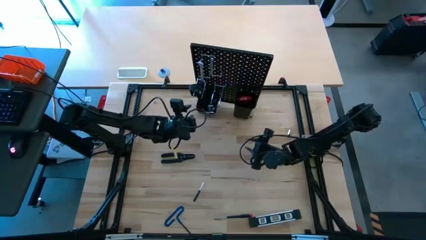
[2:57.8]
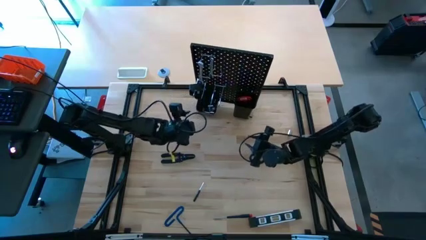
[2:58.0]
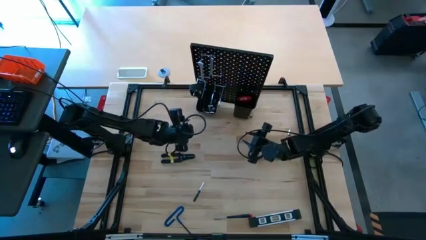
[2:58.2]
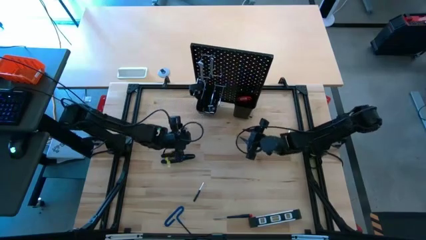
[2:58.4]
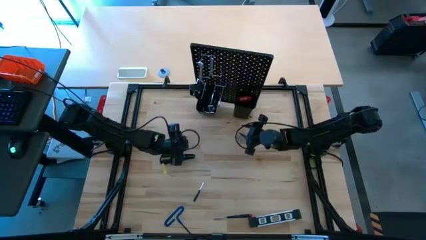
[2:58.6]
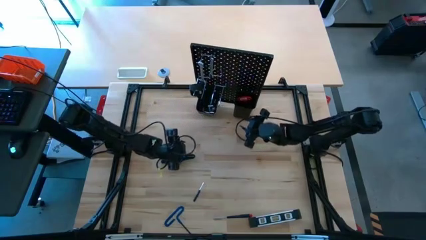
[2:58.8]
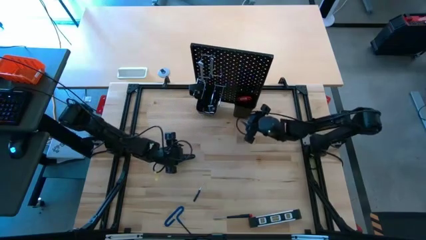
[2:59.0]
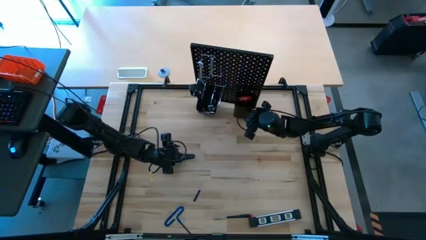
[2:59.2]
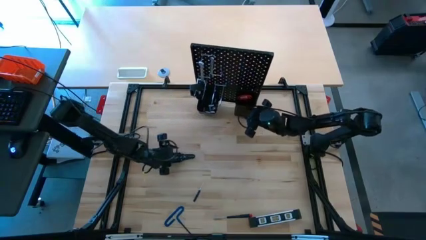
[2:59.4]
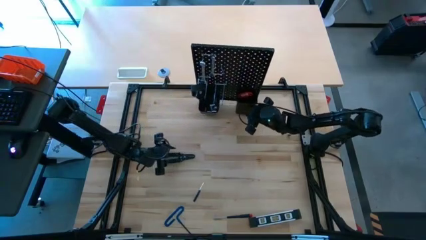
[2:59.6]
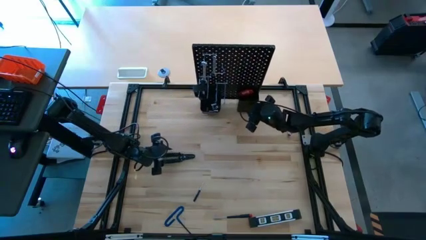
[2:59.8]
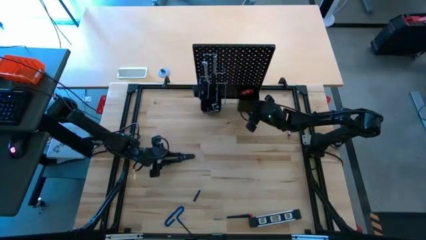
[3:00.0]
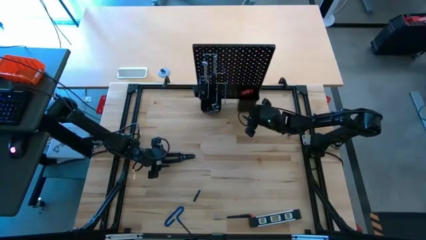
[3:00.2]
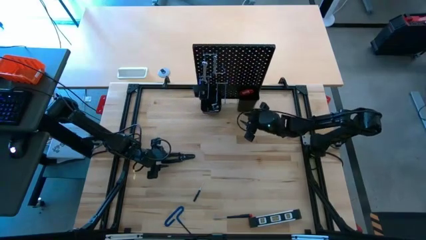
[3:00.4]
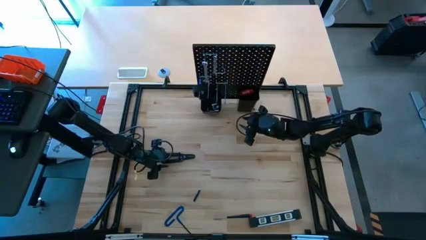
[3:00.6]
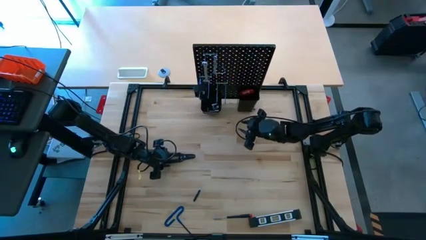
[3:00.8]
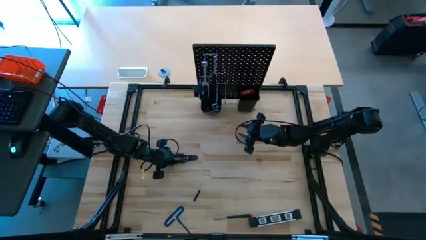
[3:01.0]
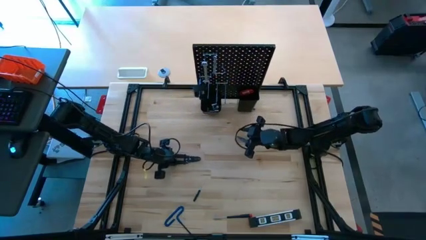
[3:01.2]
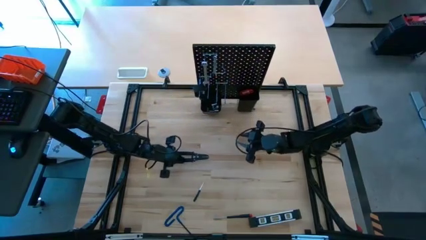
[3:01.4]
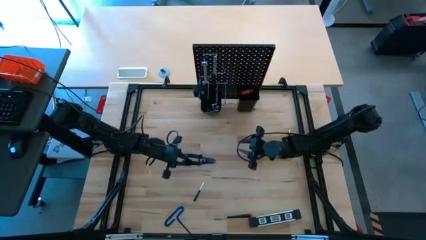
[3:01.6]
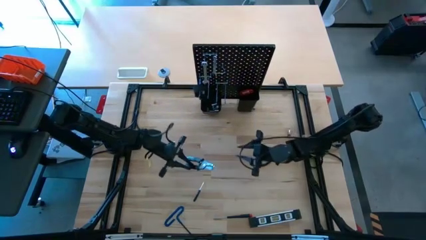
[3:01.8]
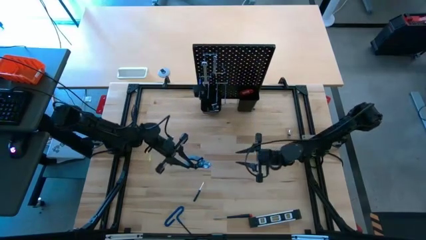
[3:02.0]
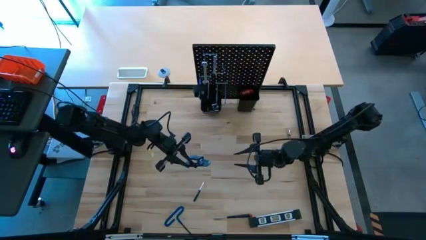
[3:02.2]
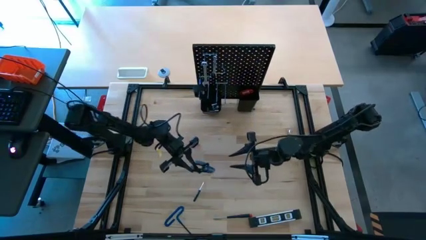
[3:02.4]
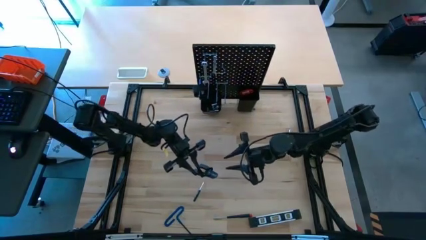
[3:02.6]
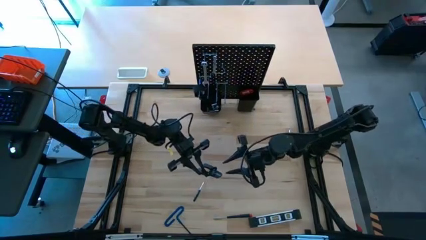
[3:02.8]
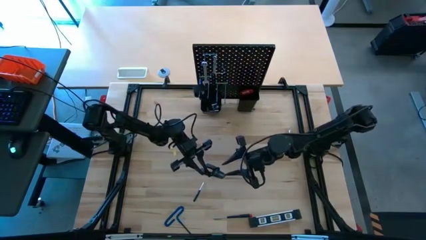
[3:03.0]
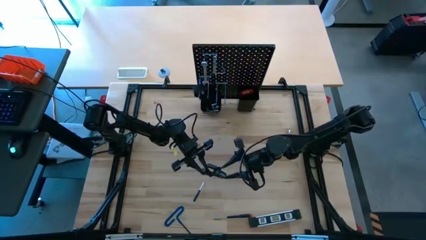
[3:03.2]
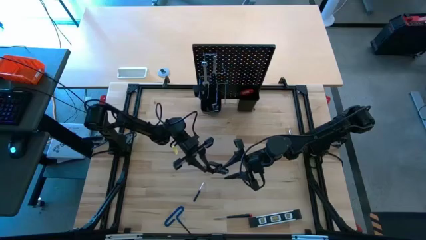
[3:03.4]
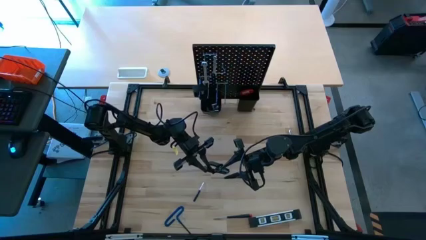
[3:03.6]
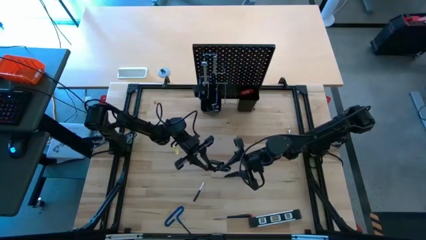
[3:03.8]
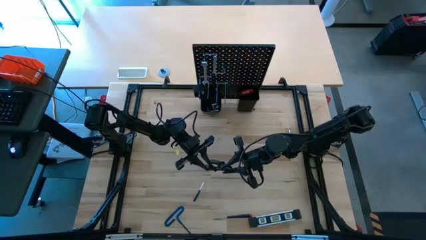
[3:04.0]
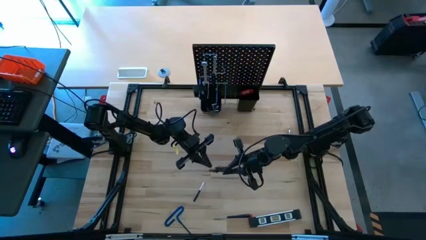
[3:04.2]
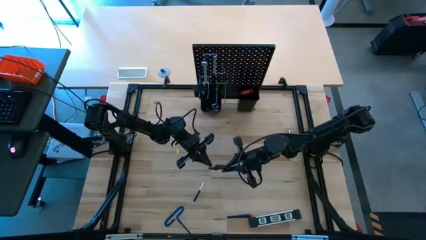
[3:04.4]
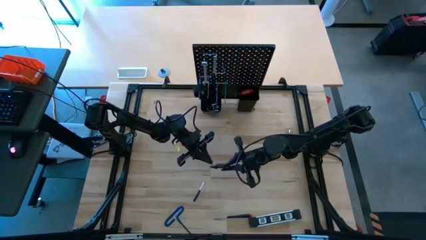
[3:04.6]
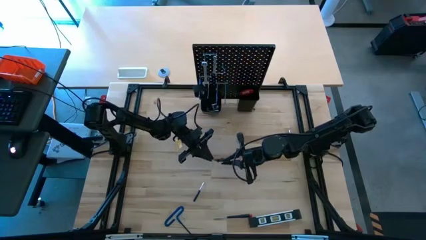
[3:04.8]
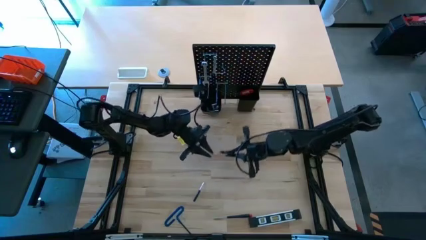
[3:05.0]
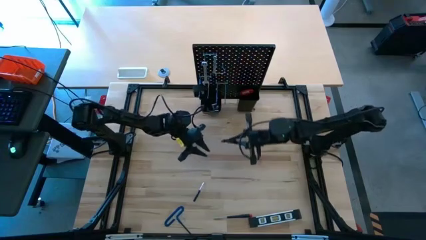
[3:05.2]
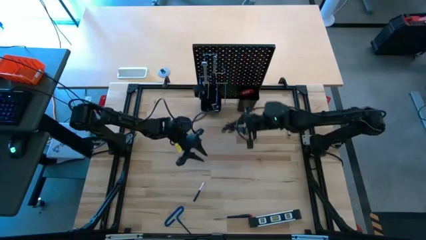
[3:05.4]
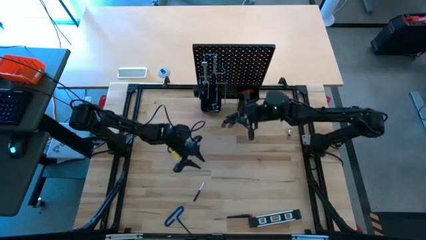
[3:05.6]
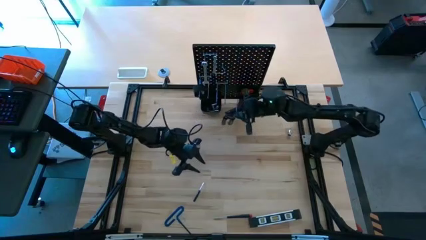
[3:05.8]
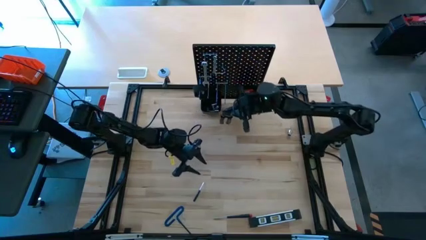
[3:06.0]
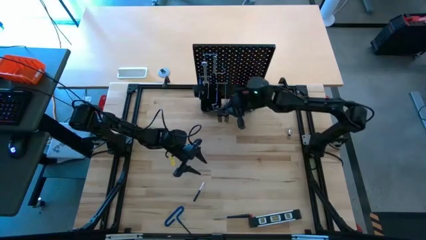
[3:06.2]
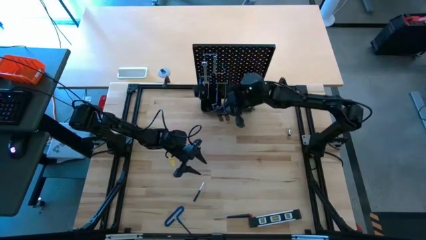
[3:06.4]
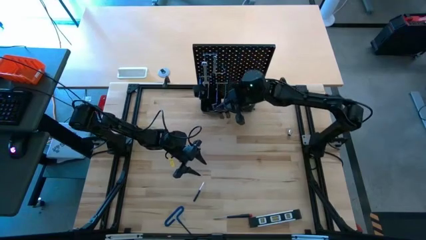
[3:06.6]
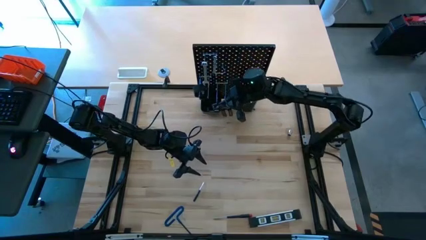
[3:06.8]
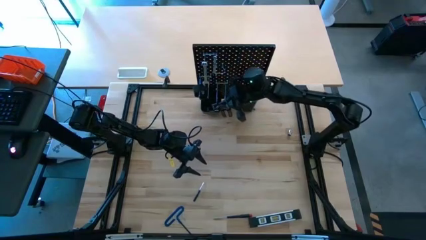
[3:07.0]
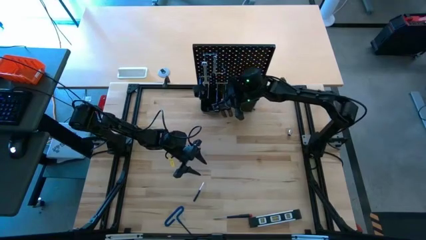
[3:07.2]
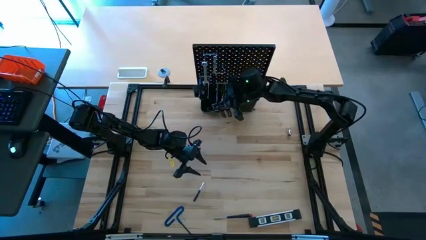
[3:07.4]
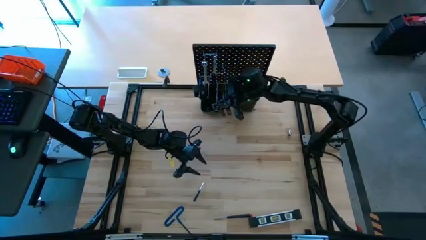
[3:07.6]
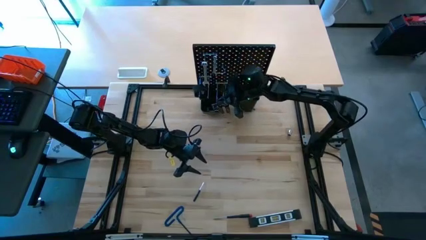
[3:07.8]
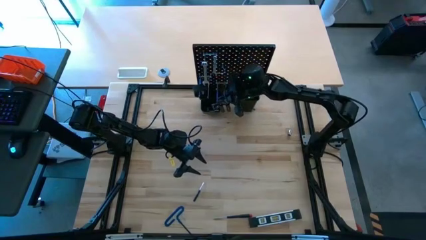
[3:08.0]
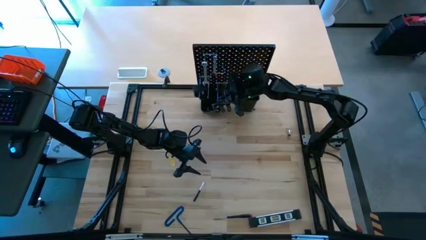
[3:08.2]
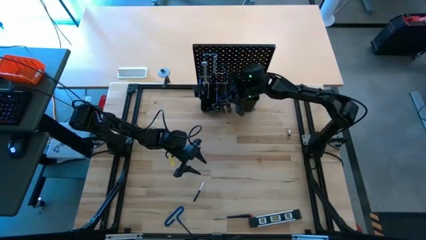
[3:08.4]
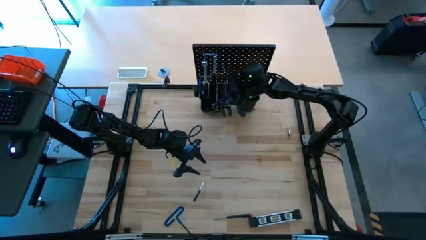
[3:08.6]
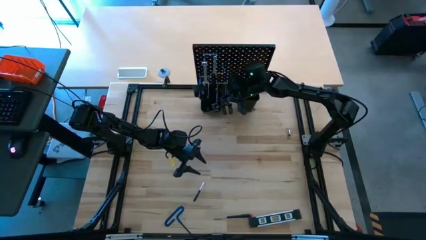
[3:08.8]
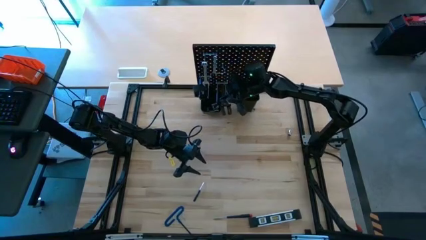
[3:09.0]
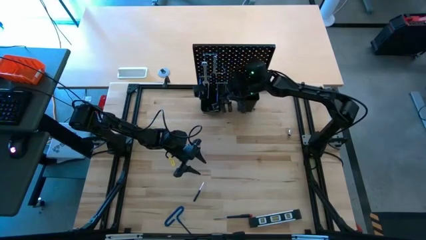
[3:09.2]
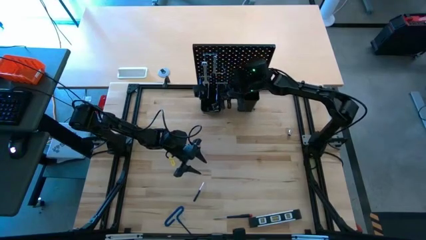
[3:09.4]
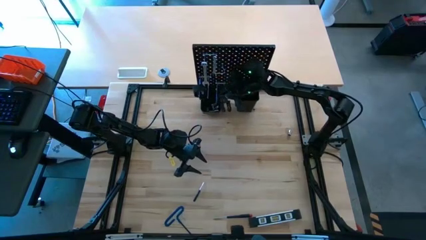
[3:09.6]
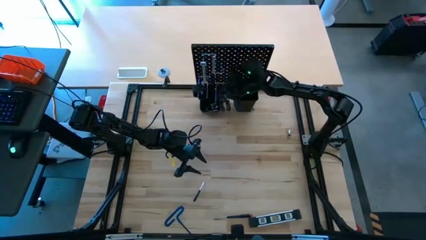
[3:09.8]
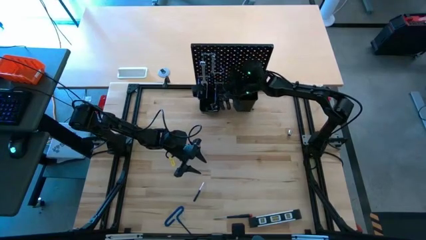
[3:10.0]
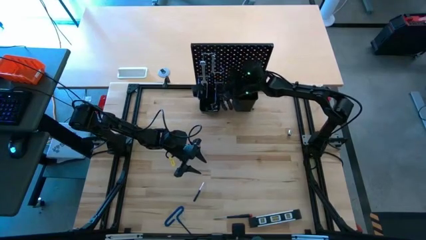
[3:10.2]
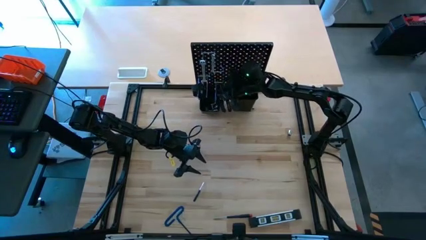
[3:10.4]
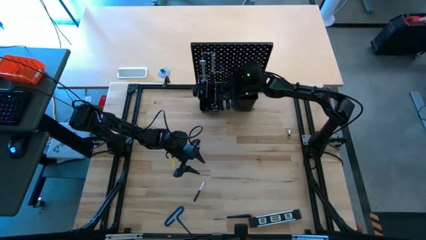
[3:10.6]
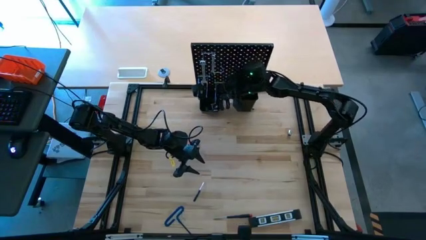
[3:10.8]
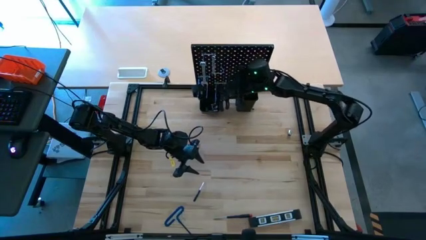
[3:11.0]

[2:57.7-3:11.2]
Task: Hang tools onto peg board
Hang the wire stripper on the pegboard

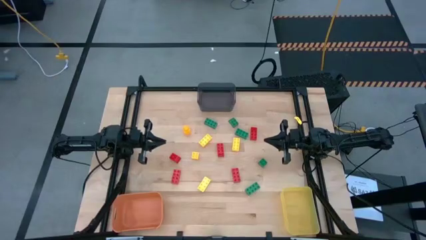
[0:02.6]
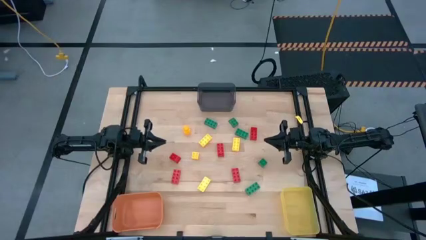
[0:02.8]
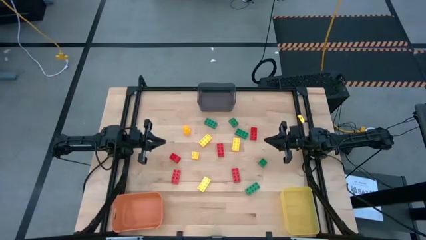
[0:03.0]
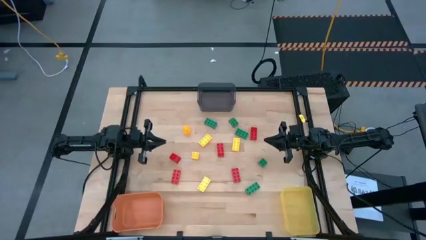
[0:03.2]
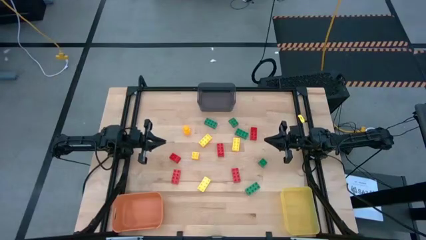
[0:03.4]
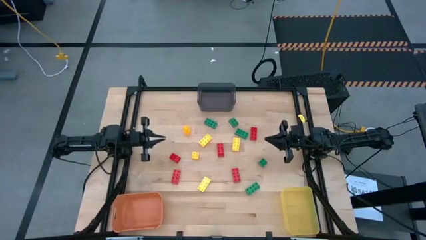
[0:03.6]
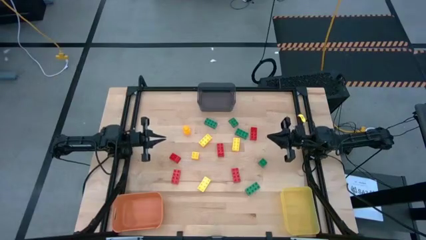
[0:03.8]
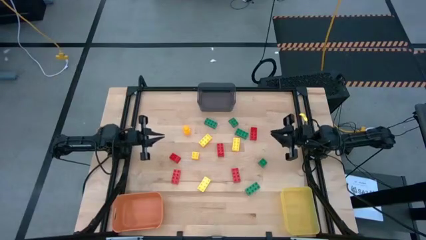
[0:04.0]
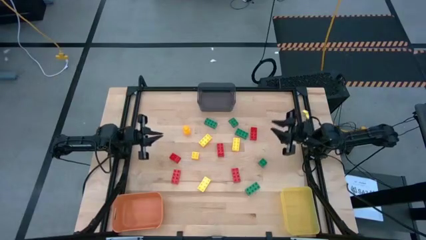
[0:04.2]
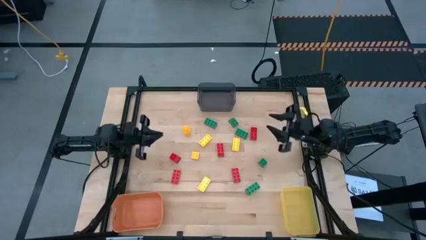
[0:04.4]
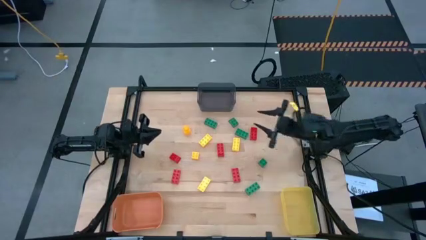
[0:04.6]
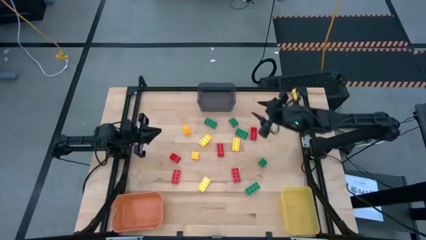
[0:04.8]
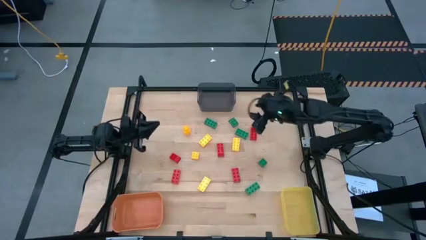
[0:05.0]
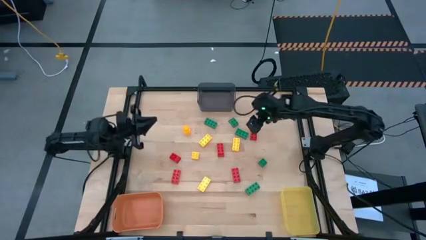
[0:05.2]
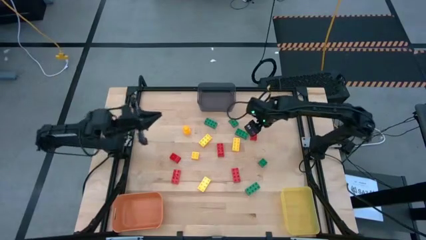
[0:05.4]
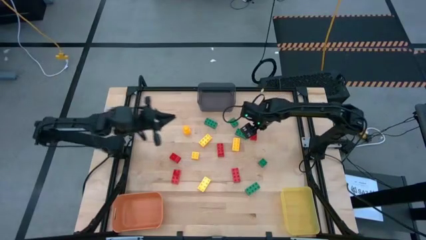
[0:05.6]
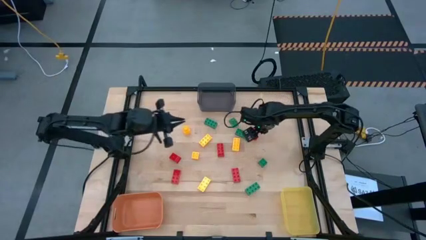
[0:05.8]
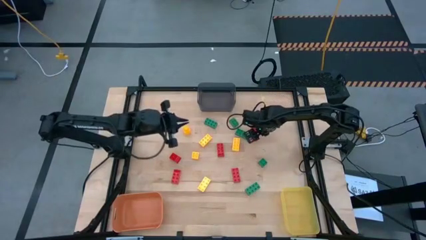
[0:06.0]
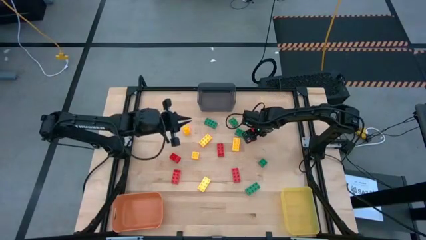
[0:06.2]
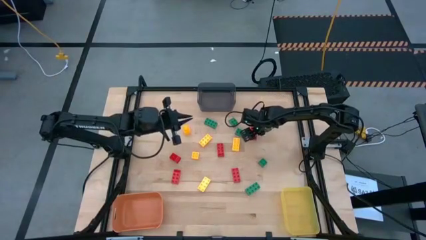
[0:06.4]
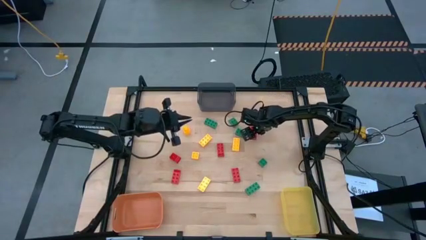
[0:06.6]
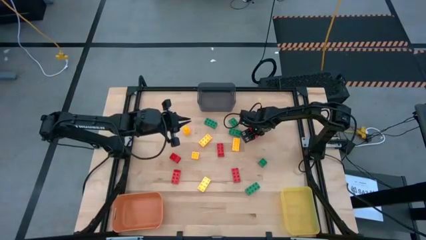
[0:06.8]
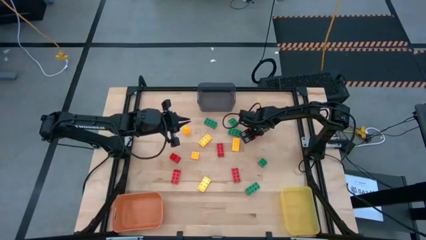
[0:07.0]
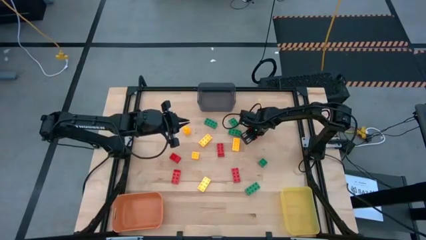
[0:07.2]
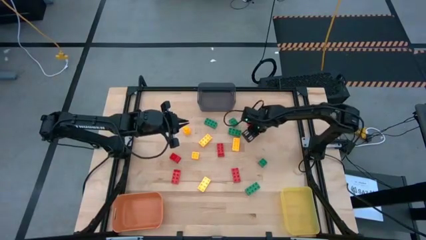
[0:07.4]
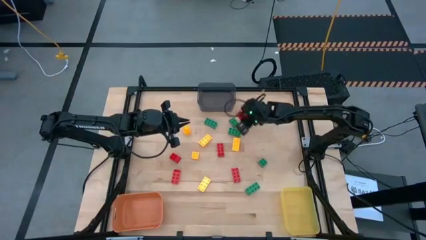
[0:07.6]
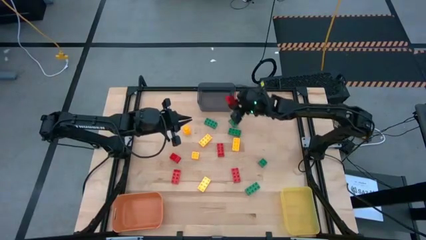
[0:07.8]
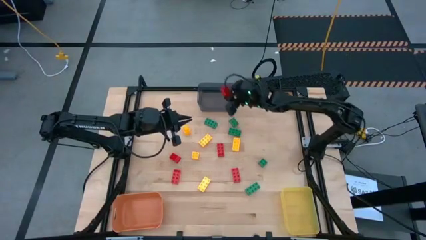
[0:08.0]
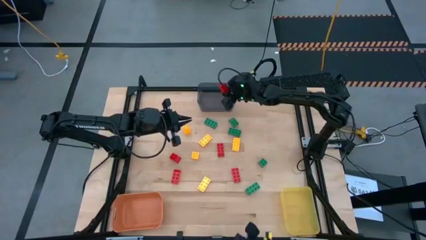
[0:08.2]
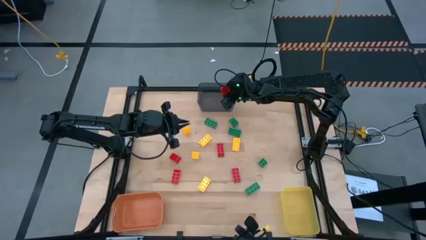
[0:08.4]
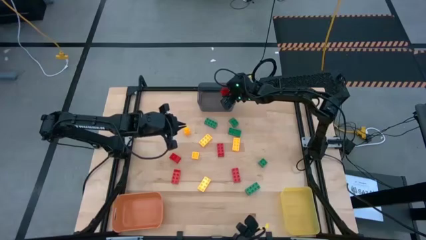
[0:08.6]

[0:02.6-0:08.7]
Task: Sort & place blocks by color
Put the red game piece into the black bin
